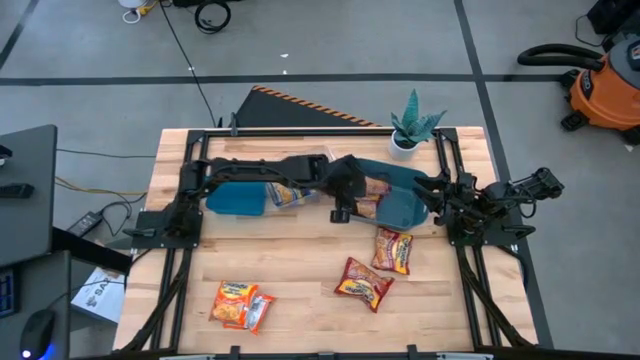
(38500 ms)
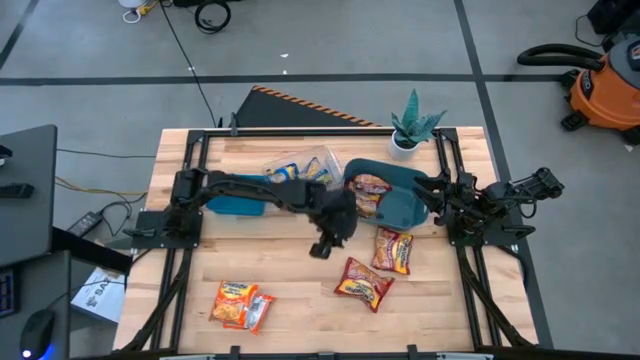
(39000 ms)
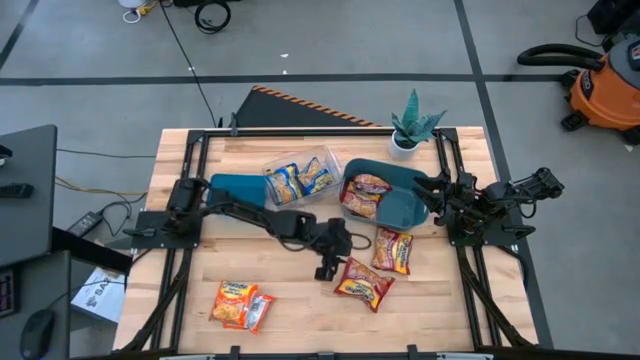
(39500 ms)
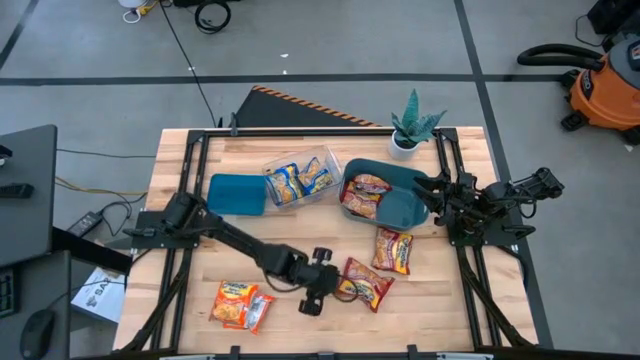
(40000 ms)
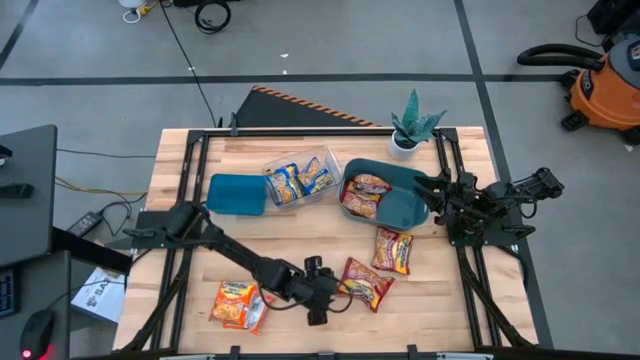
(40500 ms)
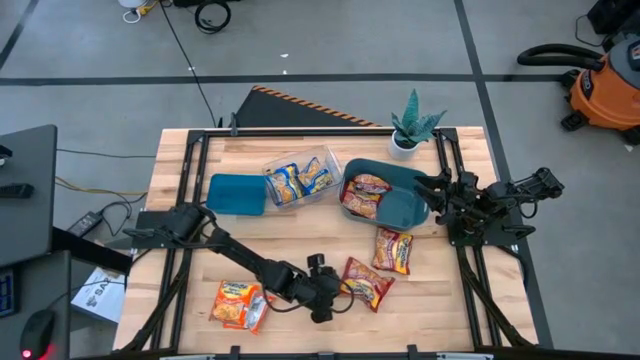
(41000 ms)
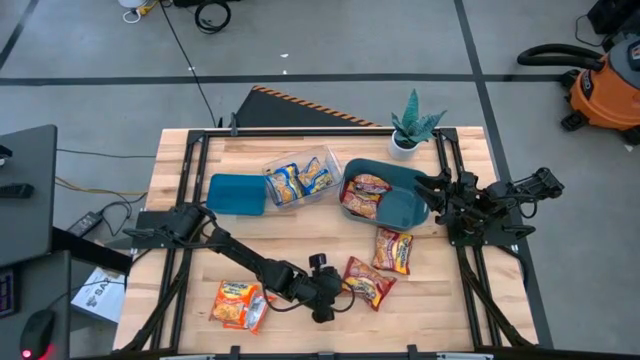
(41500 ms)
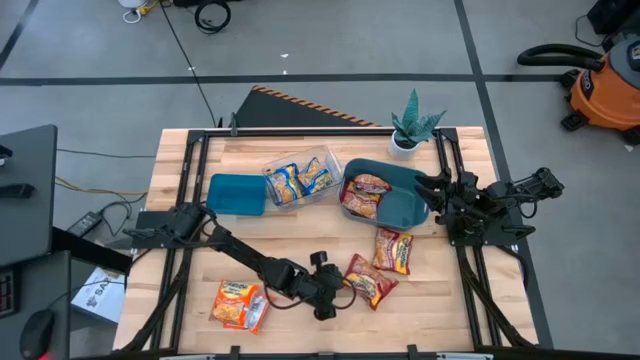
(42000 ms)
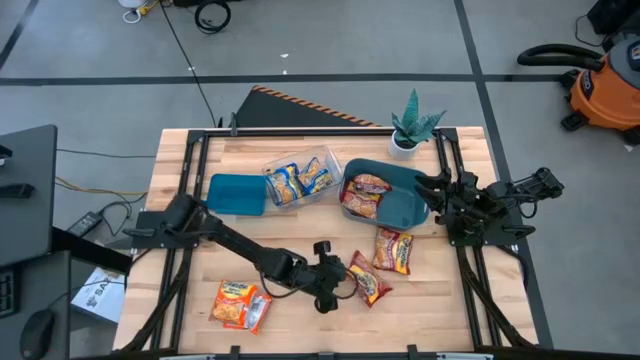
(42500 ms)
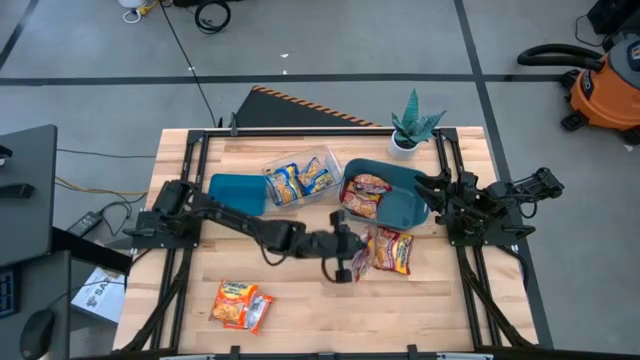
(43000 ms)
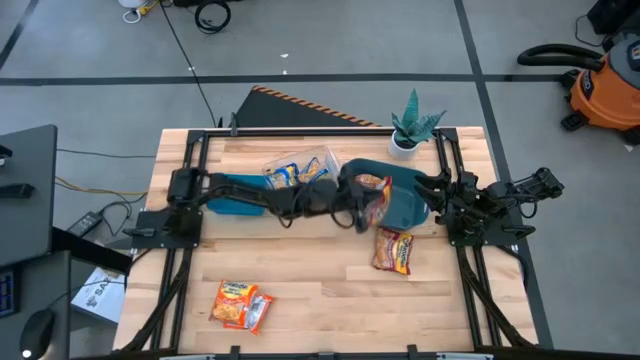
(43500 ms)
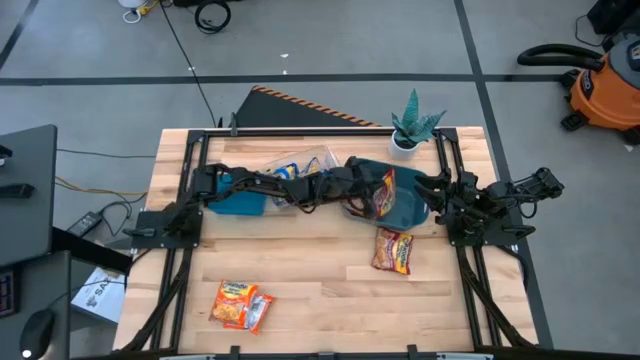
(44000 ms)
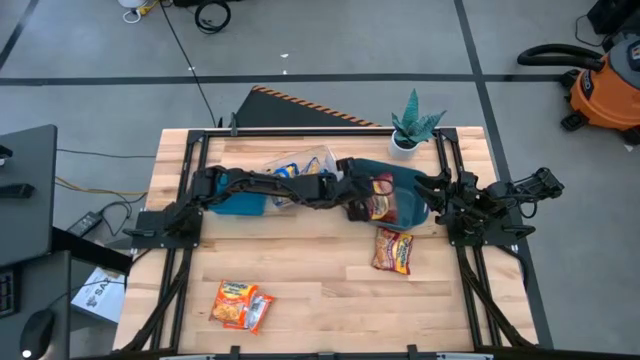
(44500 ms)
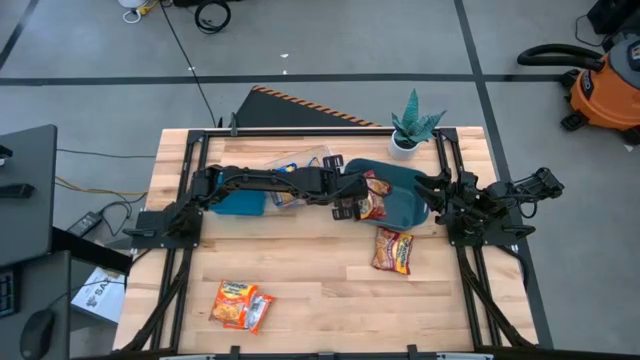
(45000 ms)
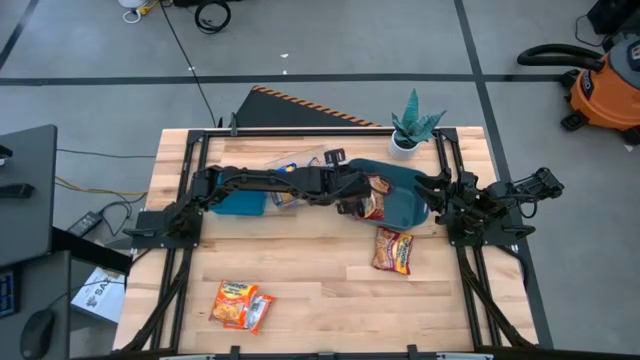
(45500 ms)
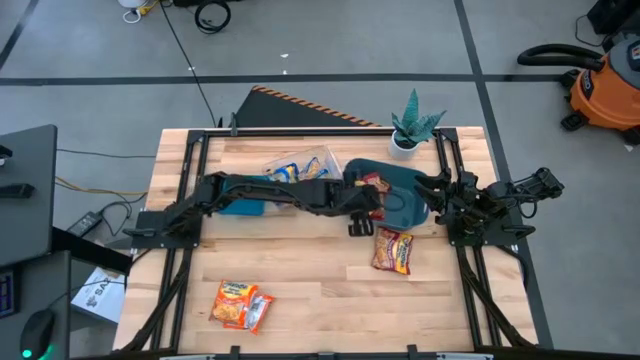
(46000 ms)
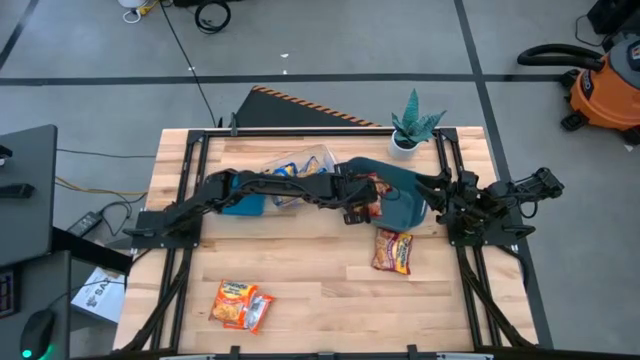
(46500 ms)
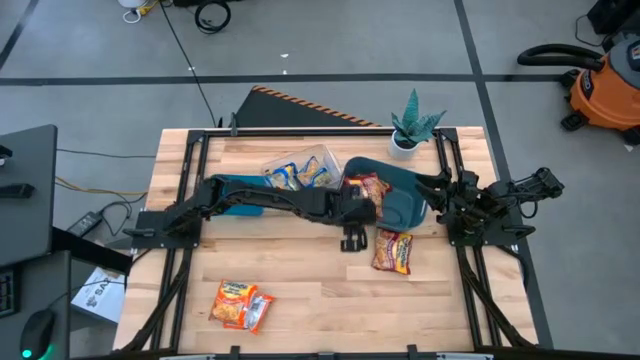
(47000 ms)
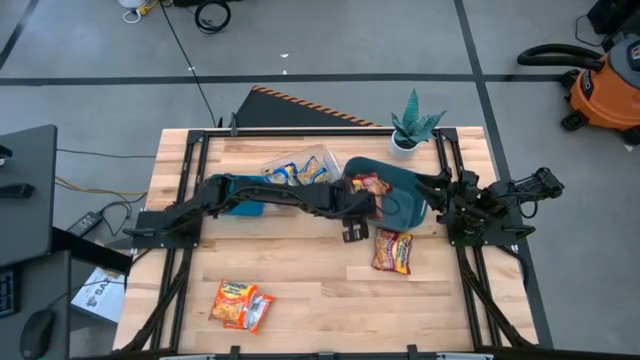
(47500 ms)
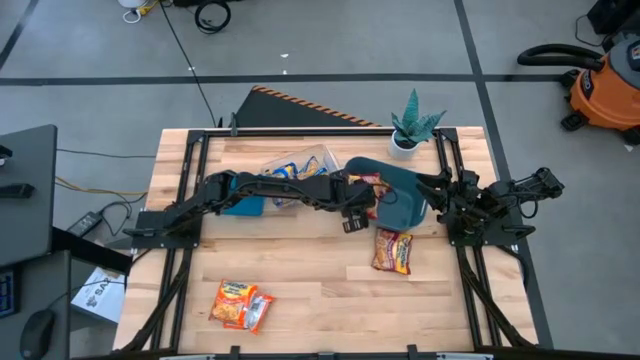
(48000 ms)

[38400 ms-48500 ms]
Task: Sort Maruchan noodles
Put the red noodle pack into the green bin

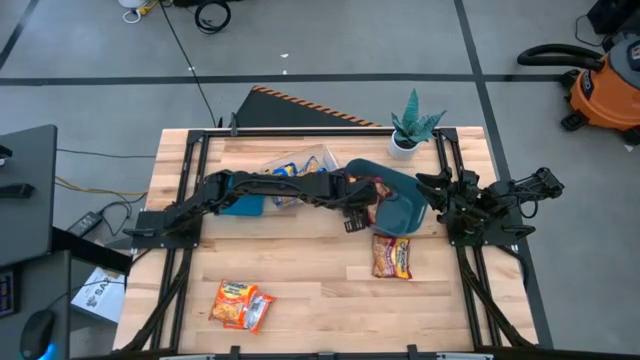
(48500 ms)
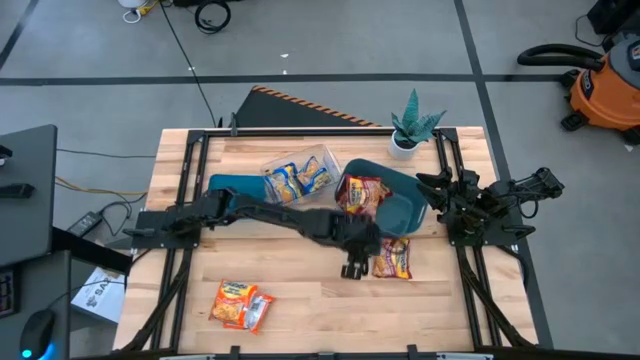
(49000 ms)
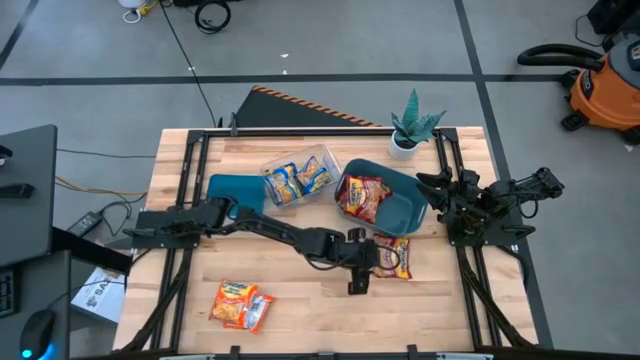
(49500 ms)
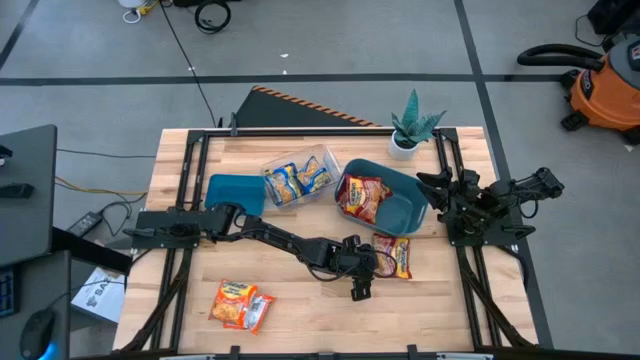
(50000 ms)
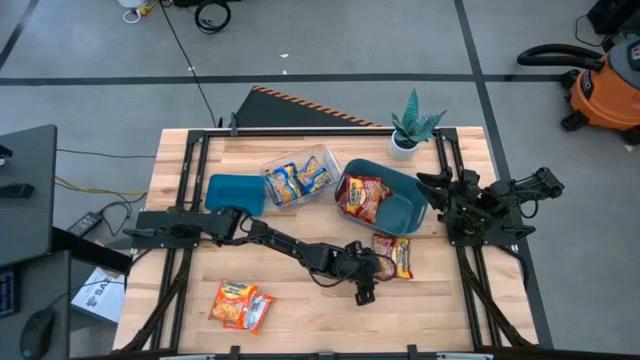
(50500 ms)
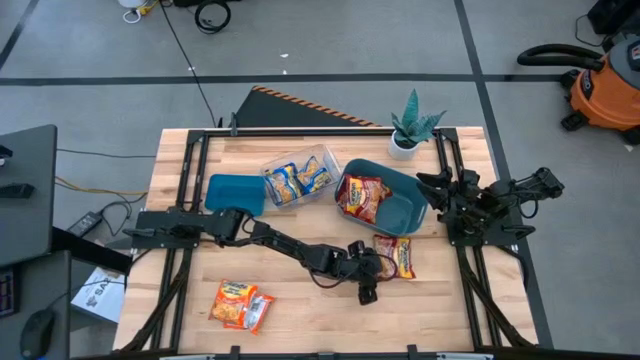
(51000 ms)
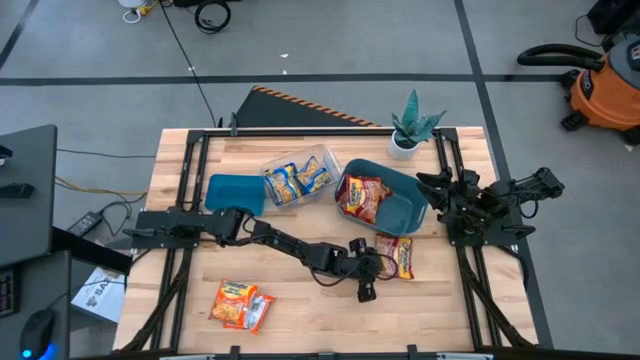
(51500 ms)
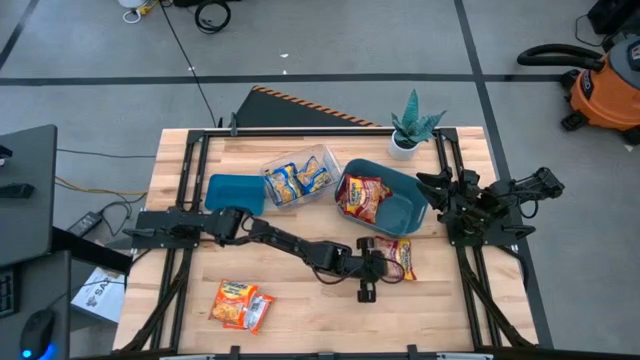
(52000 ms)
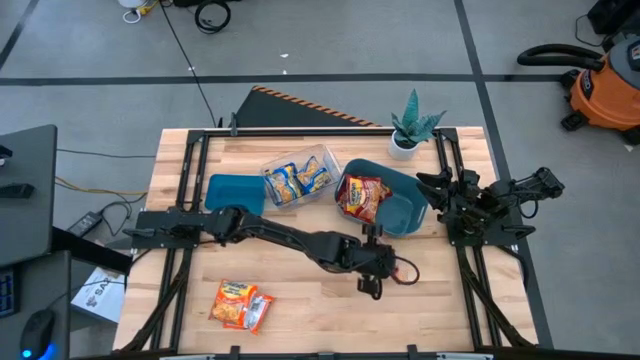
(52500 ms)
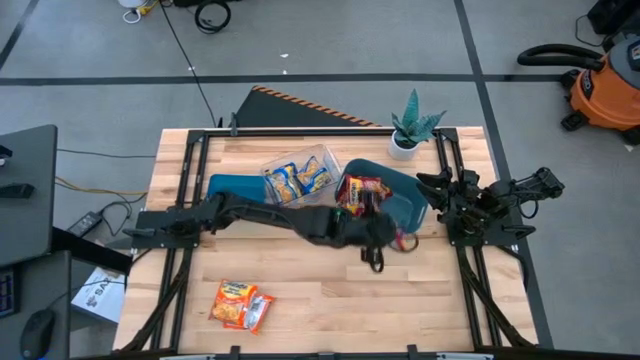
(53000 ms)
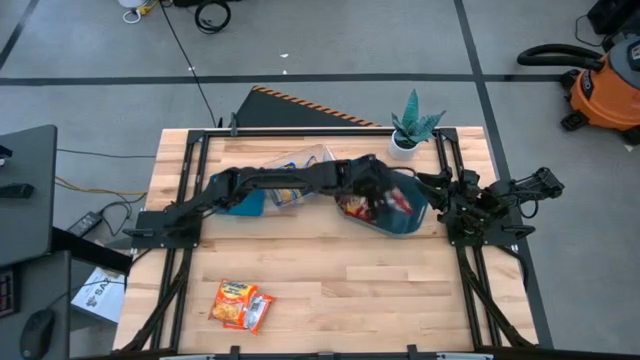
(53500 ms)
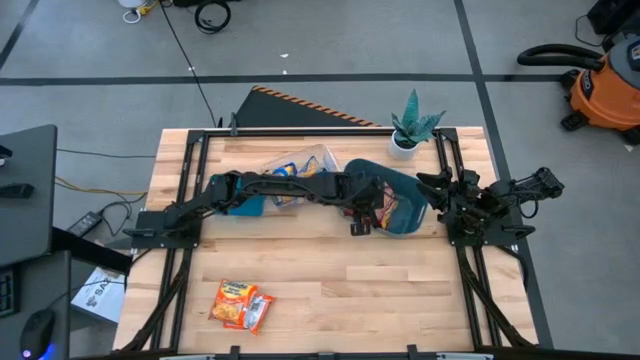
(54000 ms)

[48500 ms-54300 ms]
Put the red noodle pack into the green bin

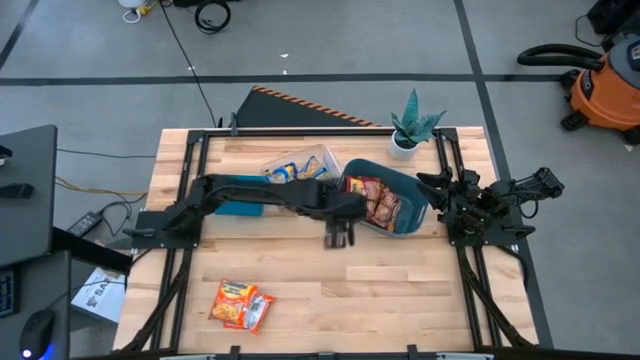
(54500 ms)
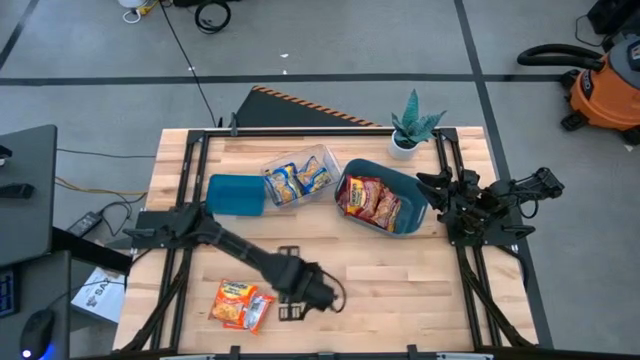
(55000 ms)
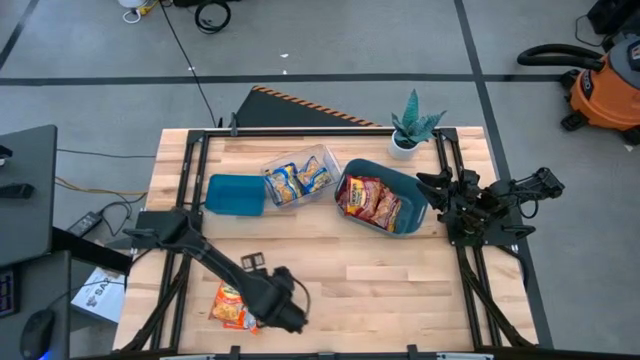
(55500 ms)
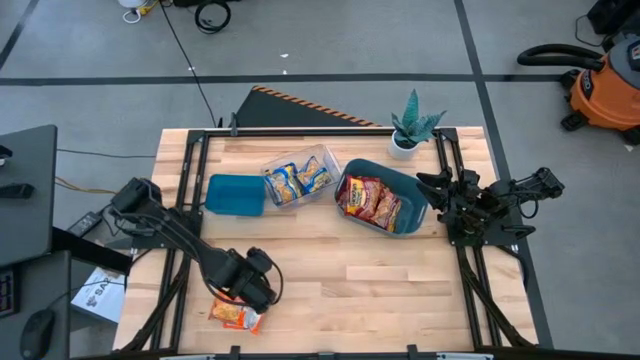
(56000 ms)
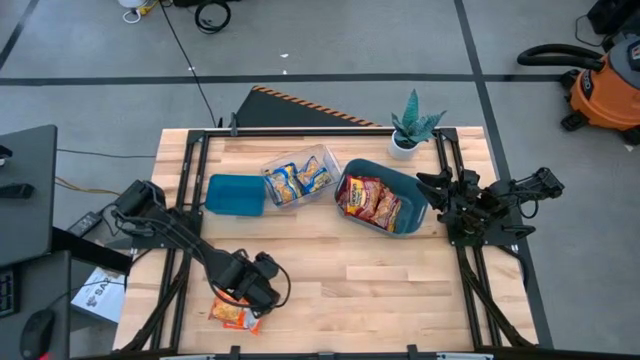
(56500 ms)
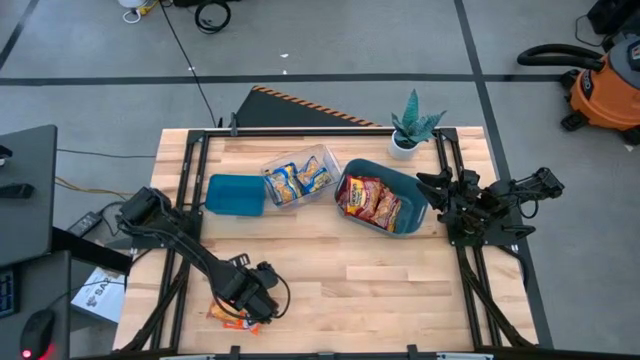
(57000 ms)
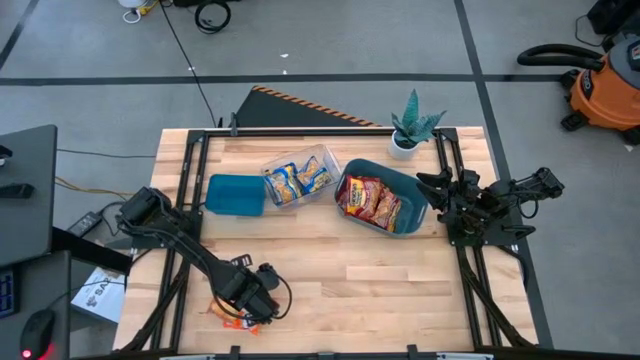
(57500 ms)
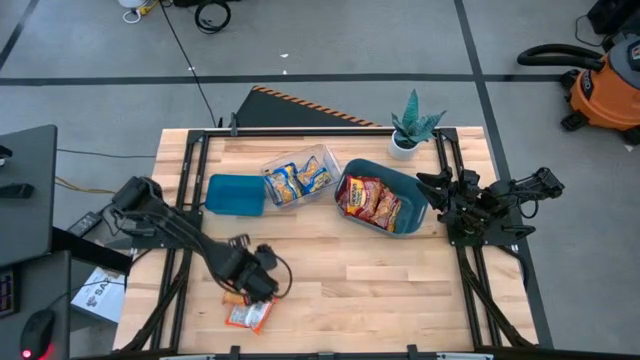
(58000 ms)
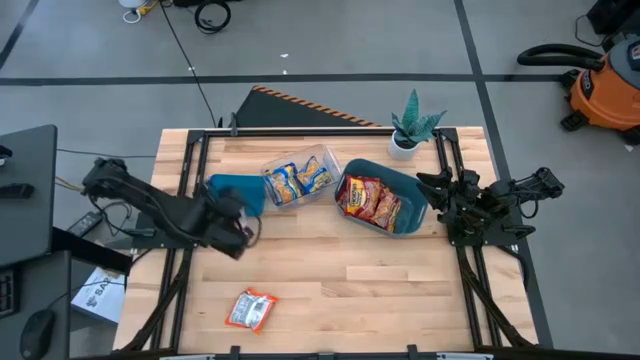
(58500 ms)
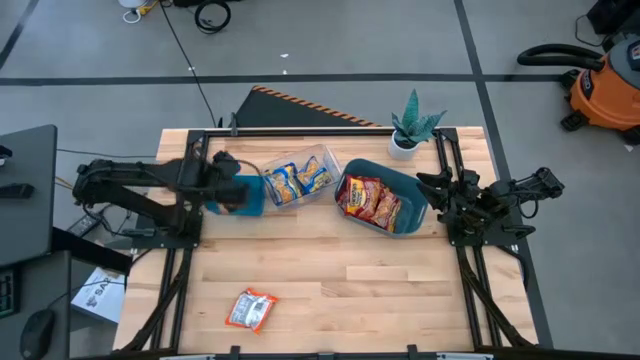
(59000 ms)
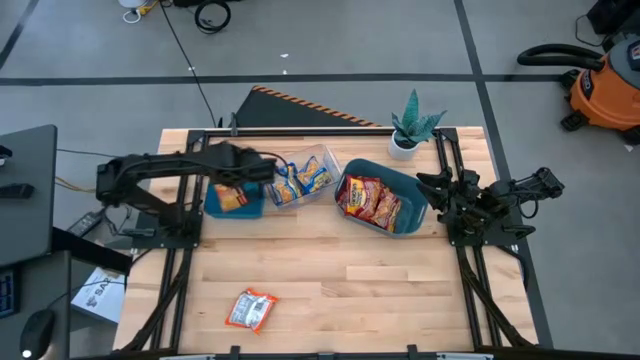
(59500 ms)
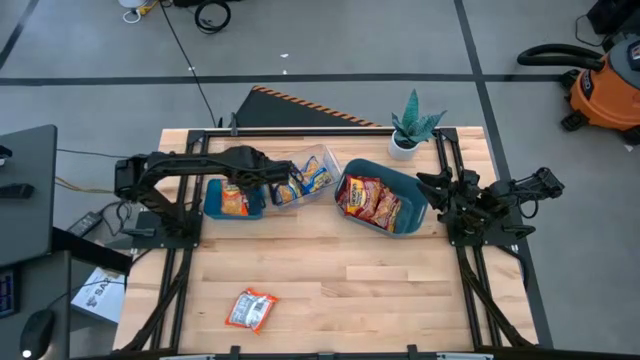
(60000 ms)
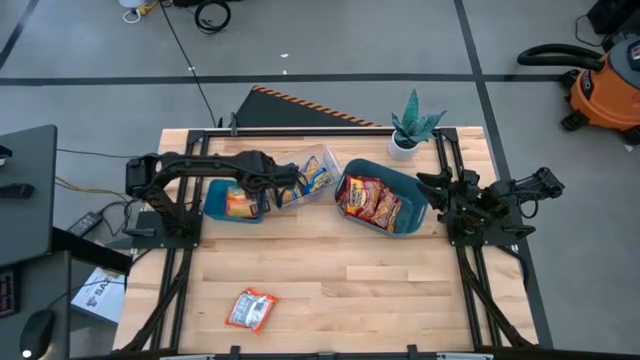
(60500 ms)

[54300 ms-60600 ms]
Put the orange noodle pack into the blue bin
